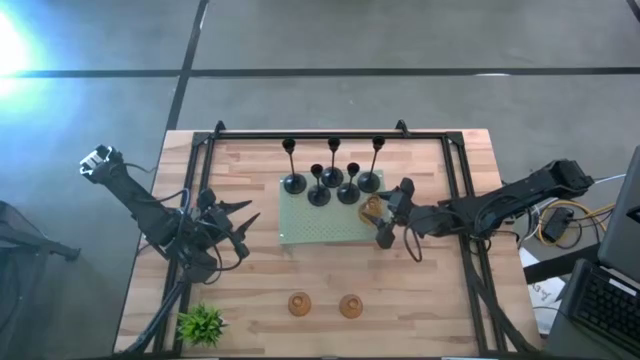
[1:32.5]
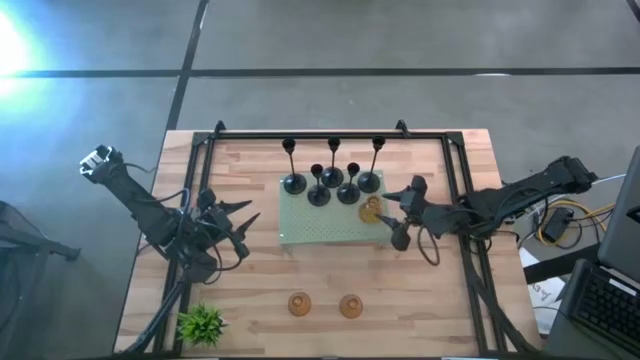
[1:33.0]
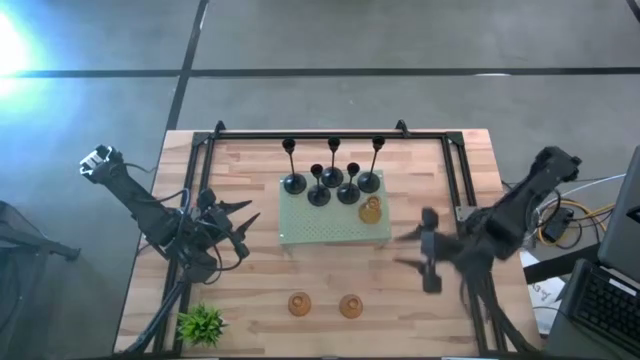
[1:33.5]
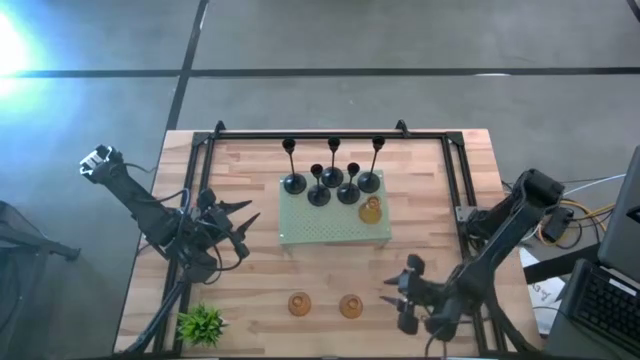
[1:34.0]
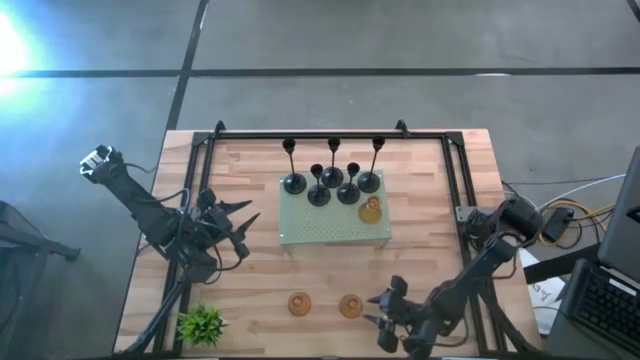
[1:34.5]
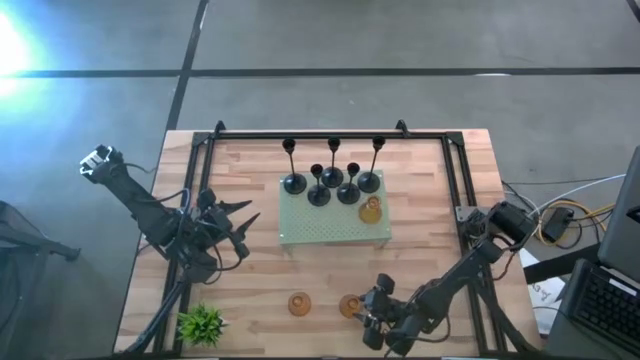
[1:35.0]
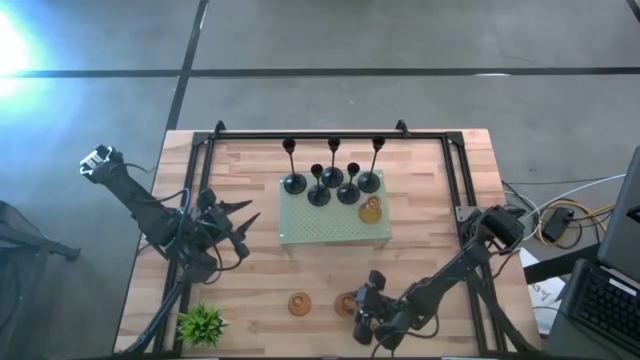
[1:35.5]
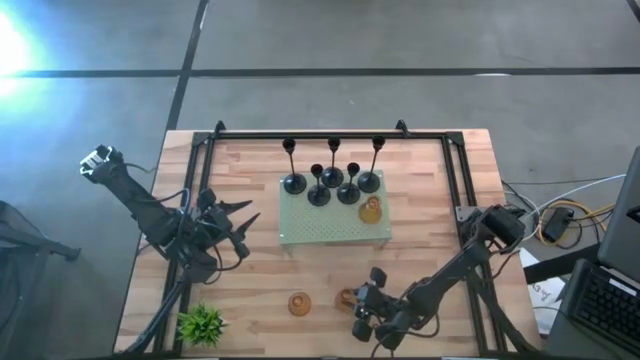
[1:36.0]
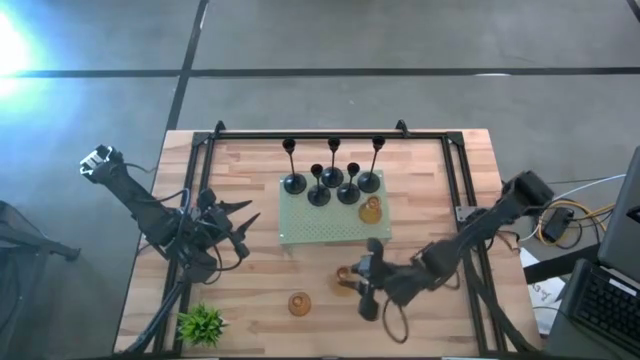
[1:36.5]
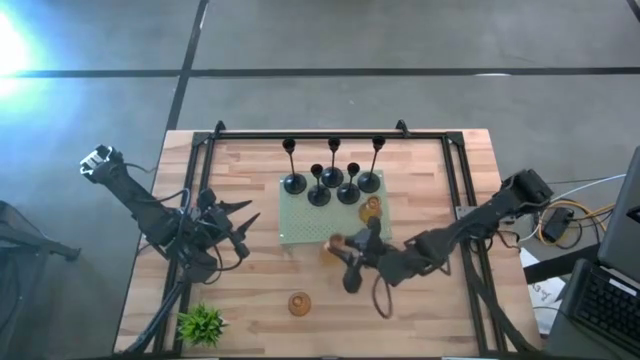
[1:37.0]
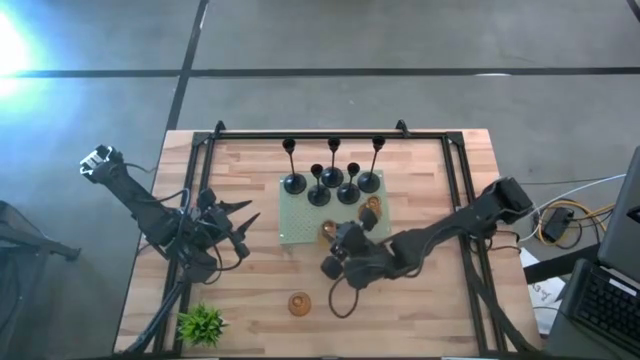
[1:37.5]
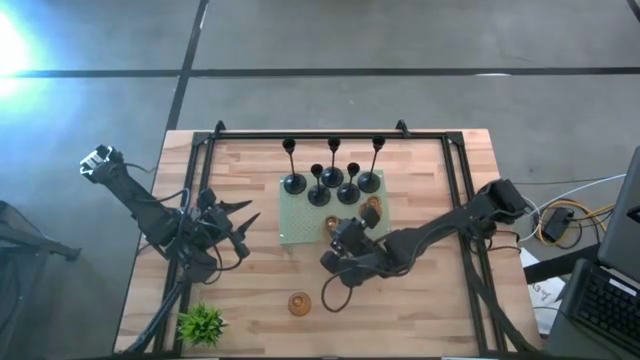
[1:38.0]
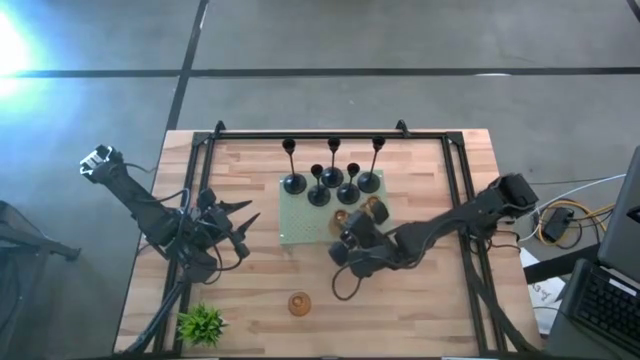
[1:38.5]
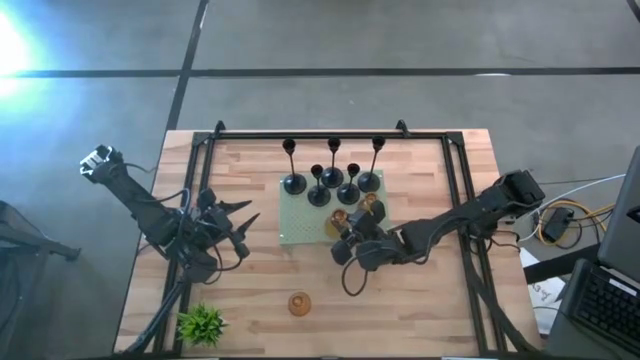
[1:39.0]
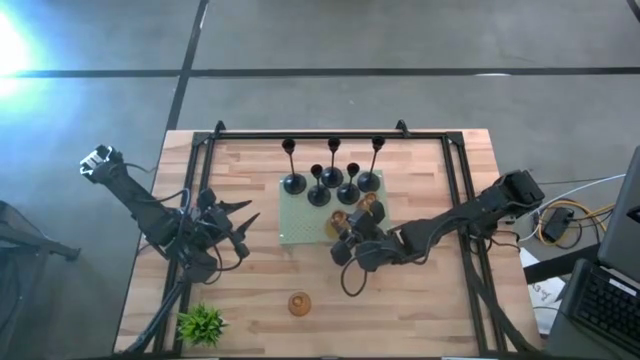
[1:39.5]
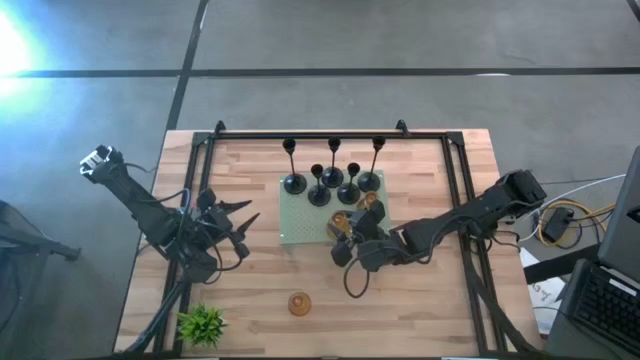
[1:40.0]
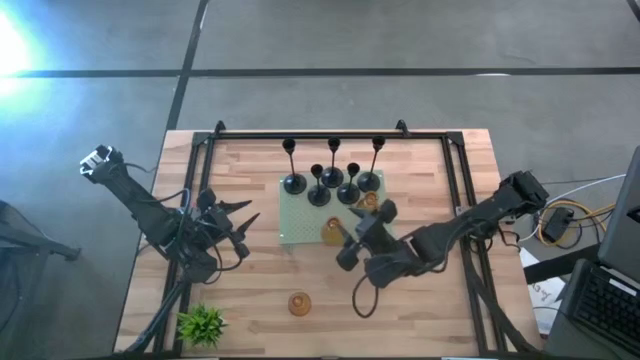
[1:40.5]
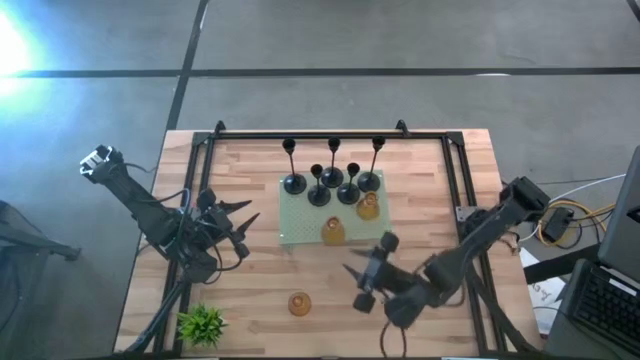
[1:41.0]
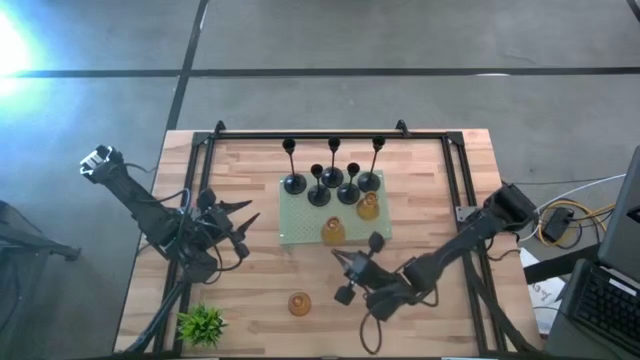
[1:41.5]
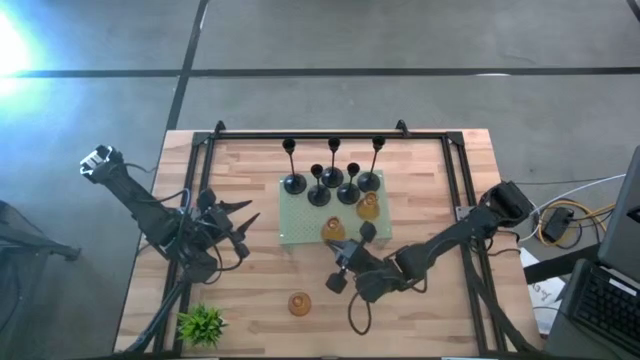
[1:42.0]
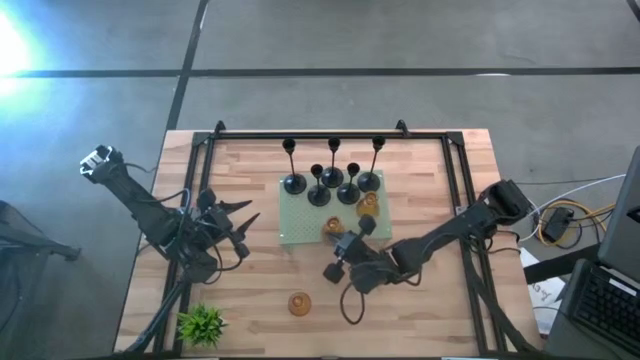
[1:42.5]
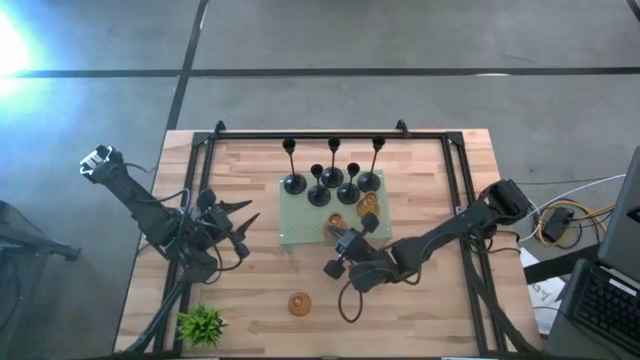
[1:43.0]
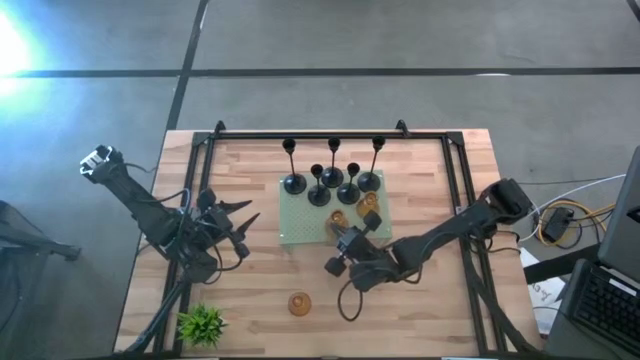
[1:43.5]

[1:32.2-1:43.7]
Task: Pick & Place candle stick holders
Put the right yellow glass candle holder on the shelf

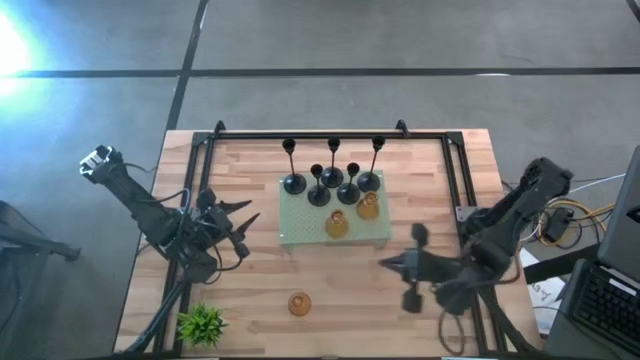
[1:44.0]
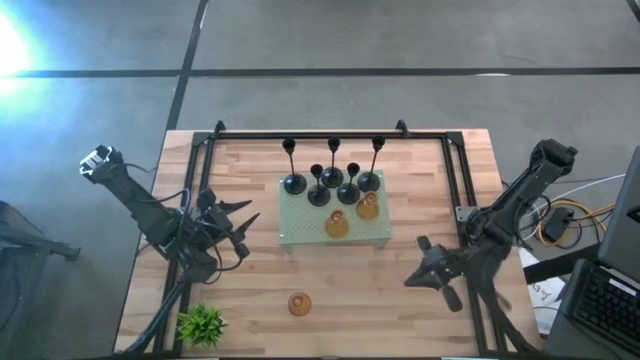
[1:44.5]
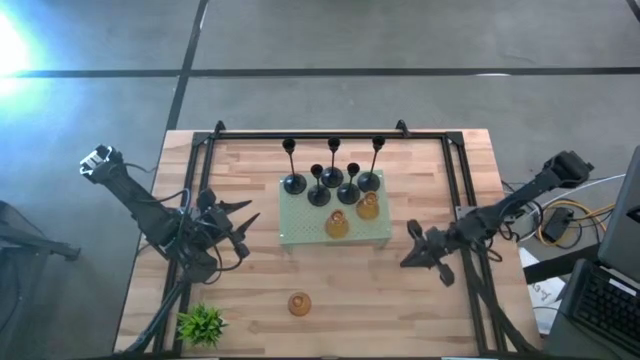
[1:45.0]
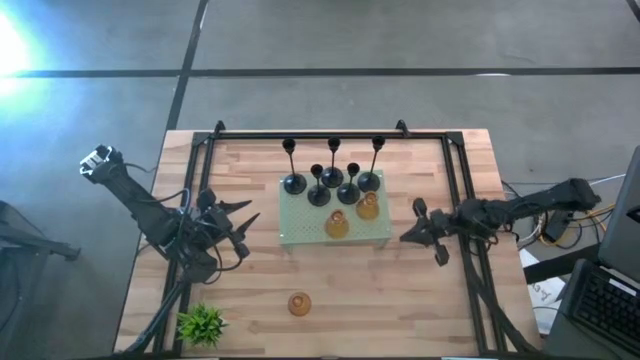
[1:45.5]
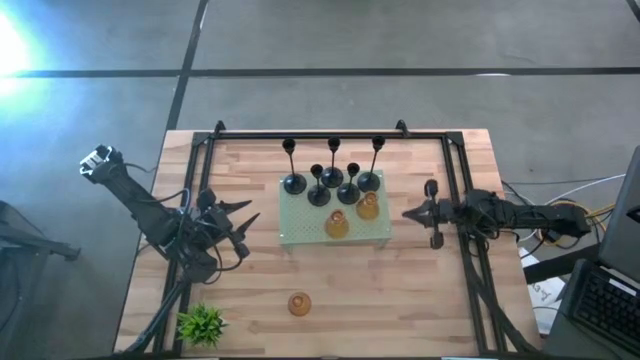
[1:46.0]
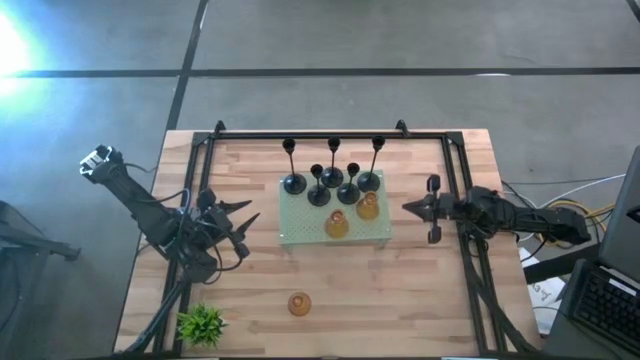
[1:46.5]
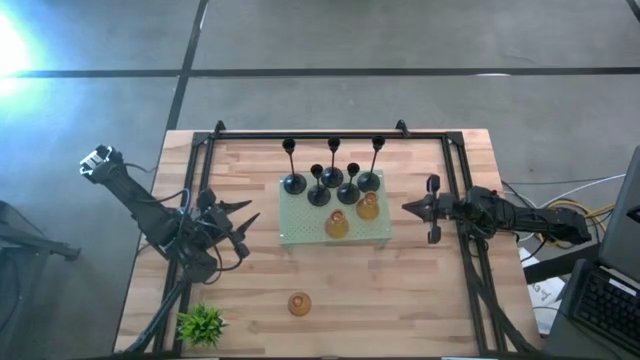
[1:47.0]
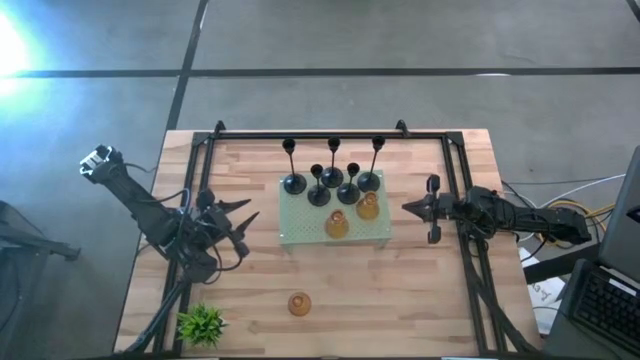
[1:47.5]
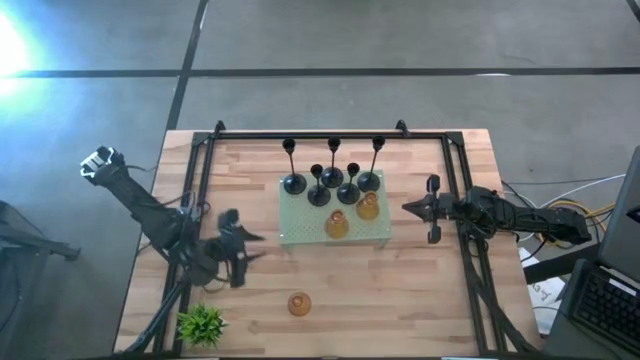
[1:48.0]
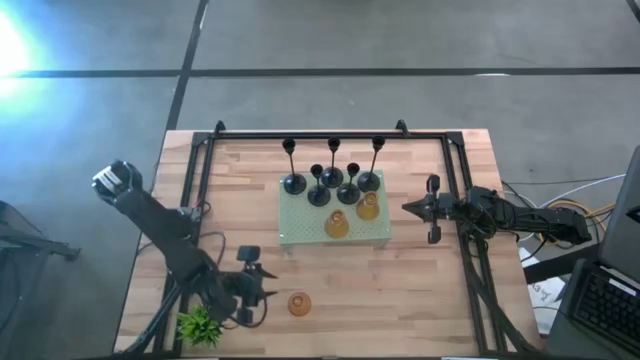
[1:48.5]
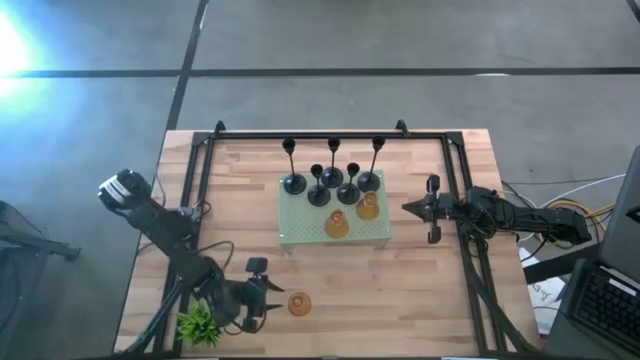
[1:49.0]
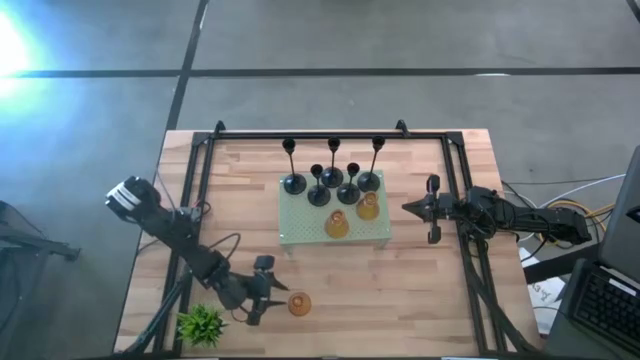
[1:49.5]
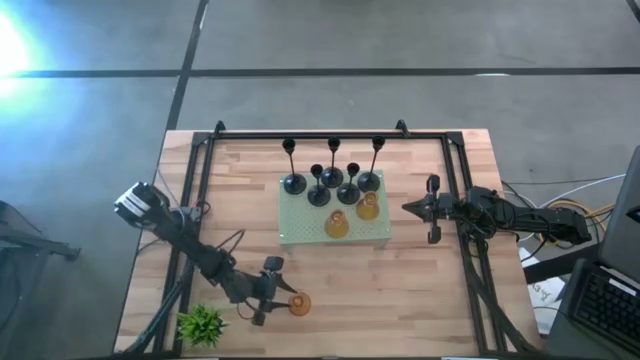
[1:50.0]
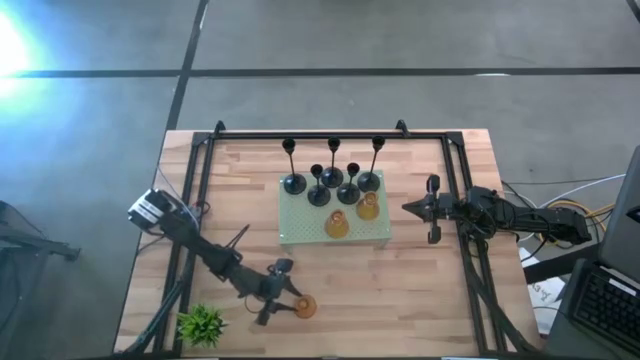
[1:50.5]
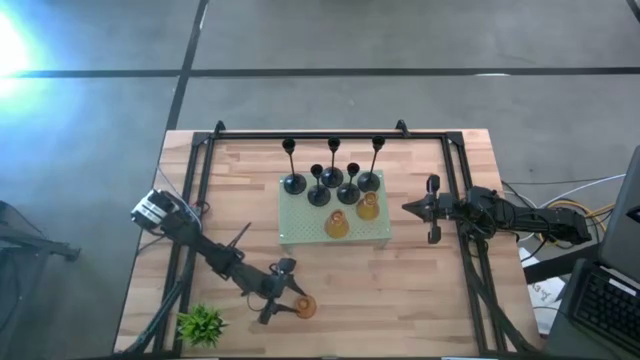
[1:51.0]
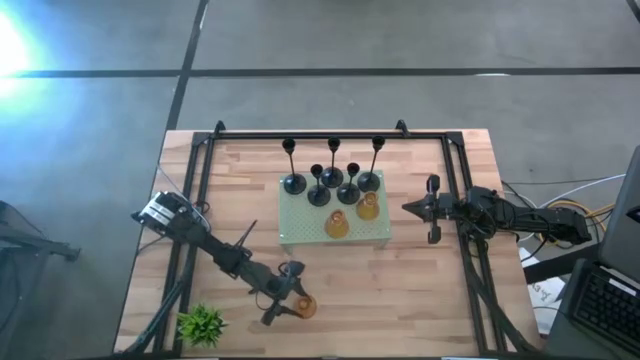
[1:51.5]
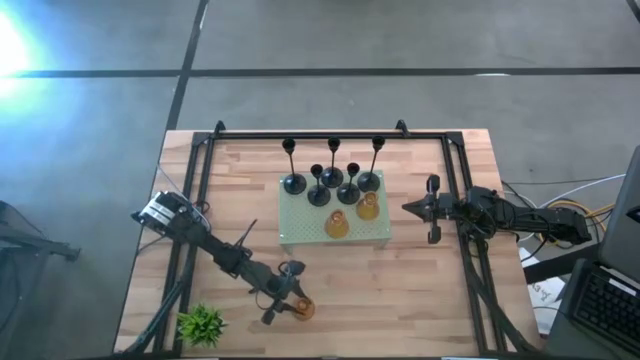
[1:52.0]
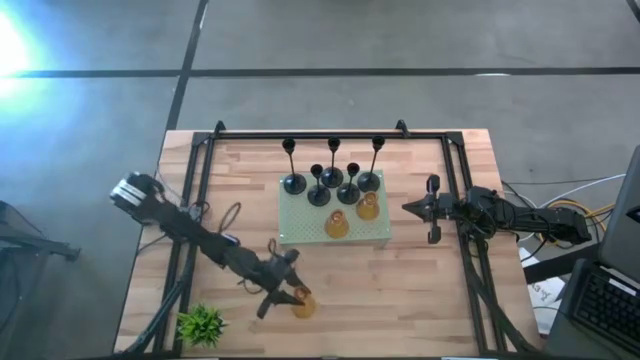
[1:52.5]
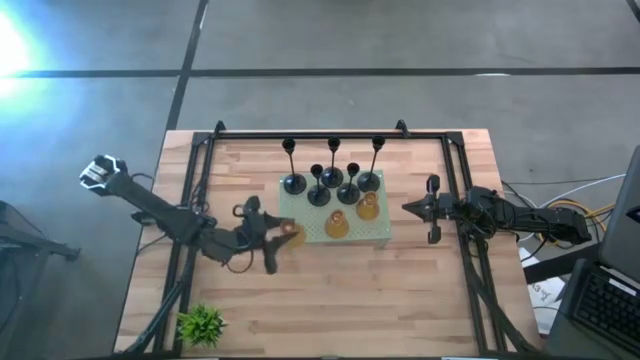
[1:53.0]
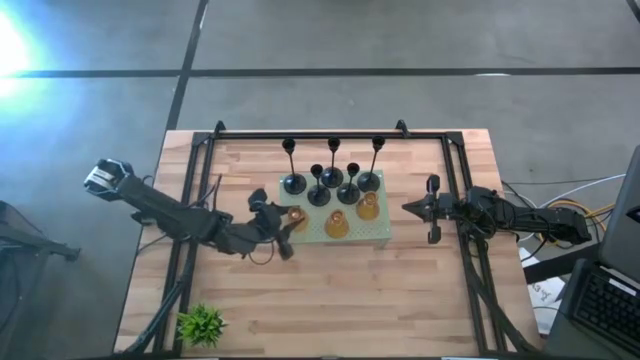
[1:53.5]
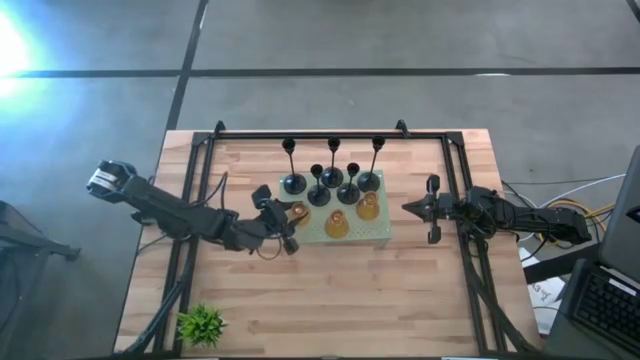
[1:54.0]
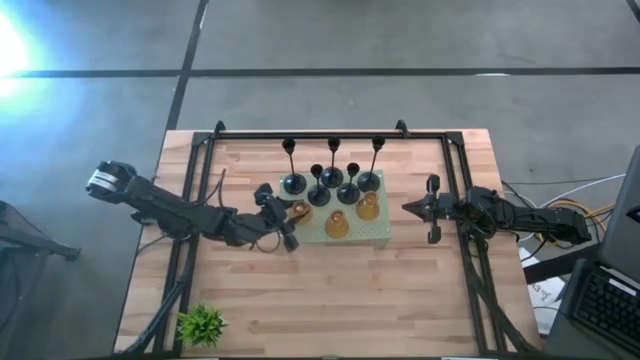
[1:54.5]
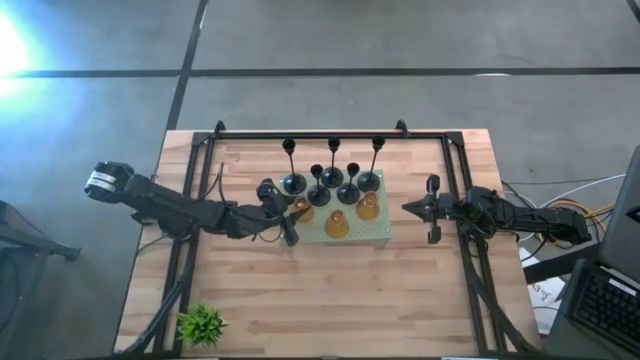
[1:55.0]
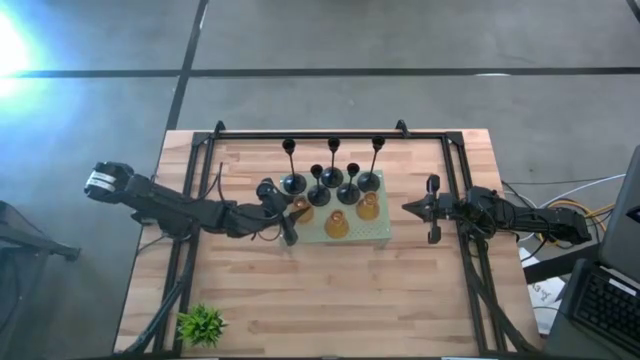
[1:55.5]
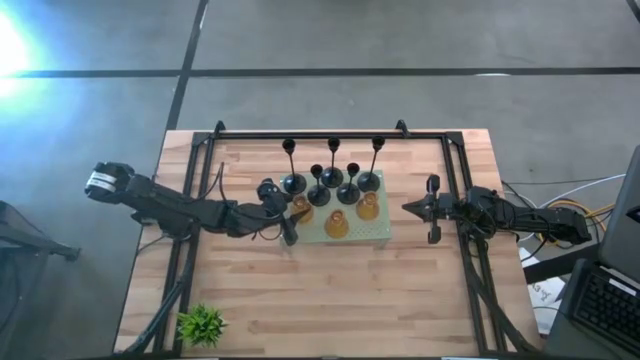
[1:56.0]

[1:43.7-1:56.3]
Put the yellow glass candle holder on the shelf
